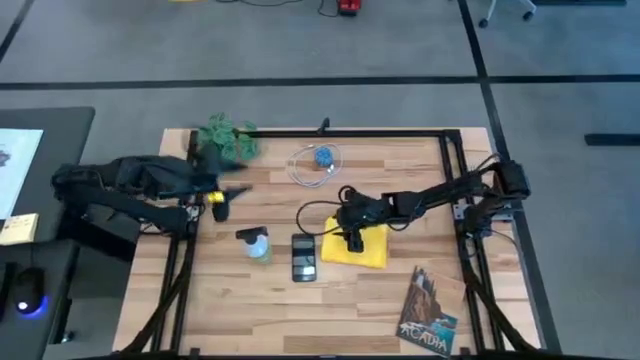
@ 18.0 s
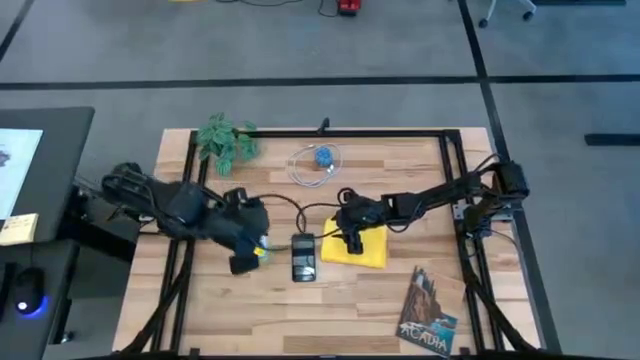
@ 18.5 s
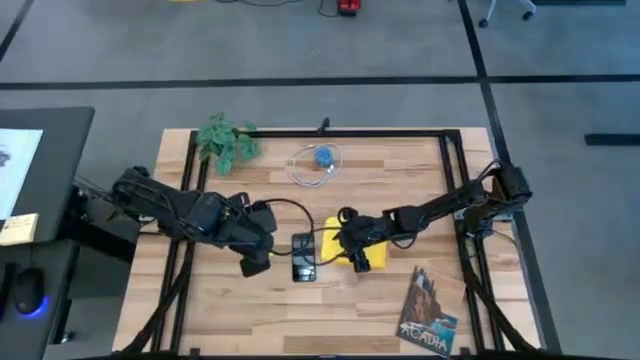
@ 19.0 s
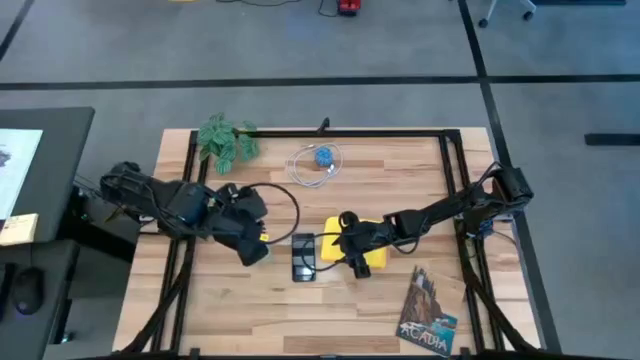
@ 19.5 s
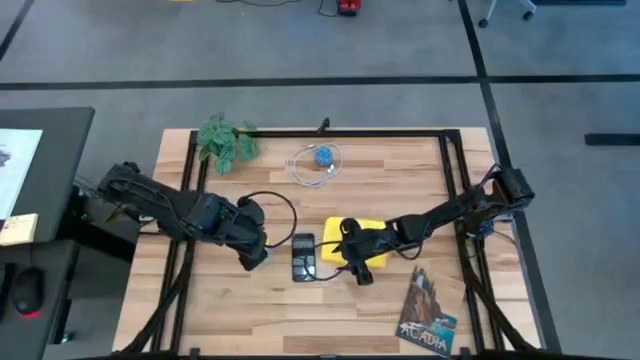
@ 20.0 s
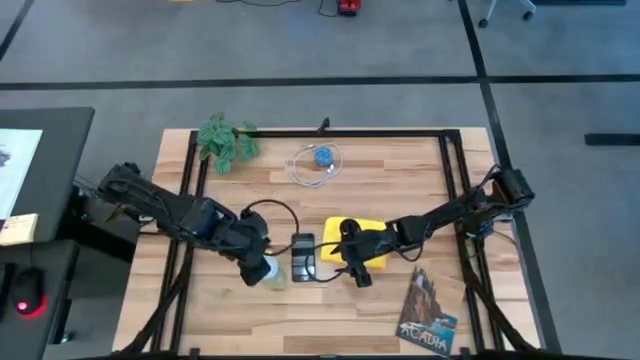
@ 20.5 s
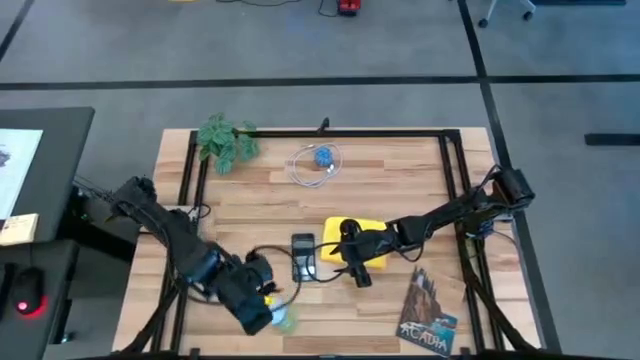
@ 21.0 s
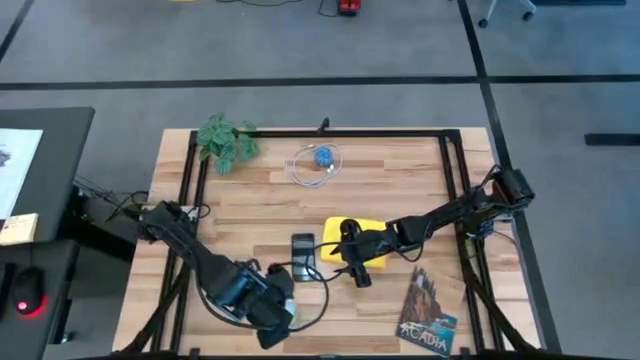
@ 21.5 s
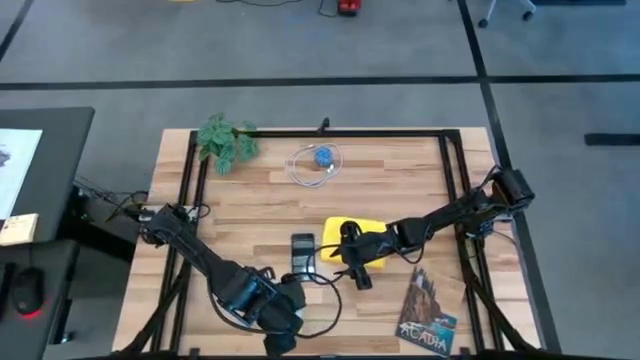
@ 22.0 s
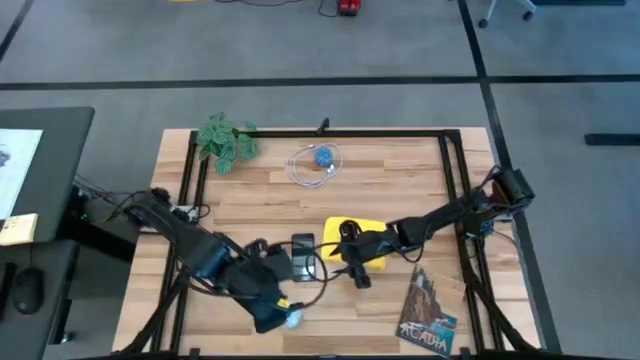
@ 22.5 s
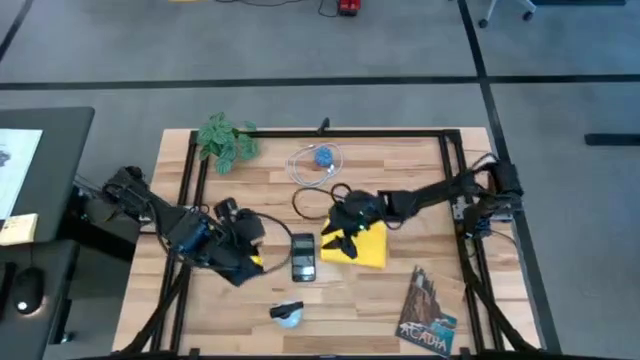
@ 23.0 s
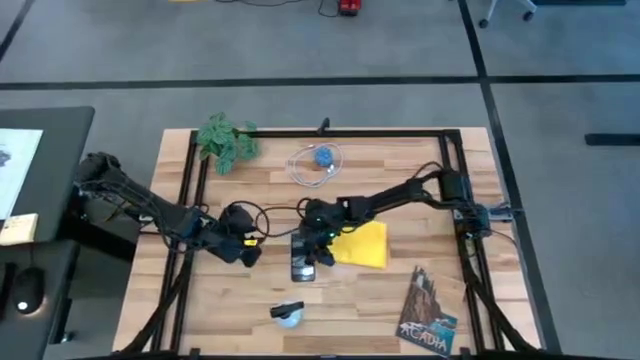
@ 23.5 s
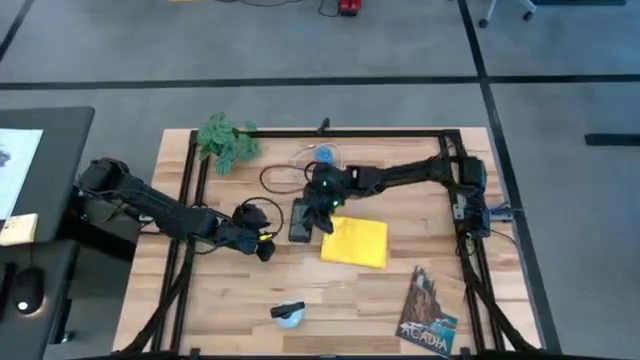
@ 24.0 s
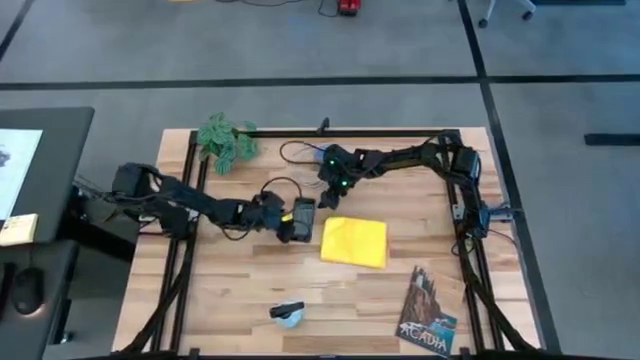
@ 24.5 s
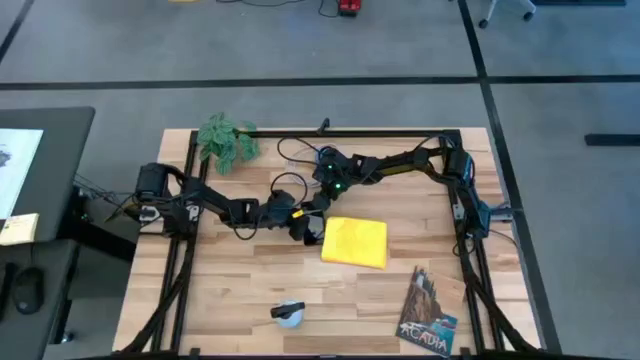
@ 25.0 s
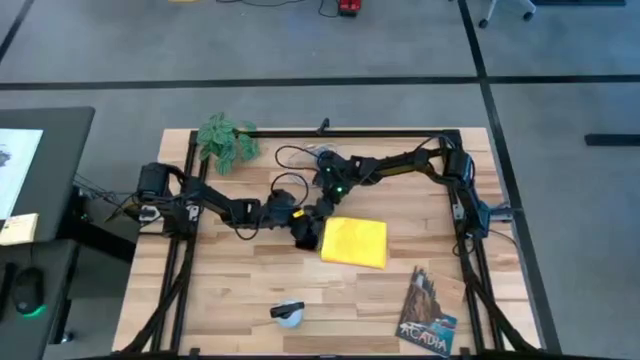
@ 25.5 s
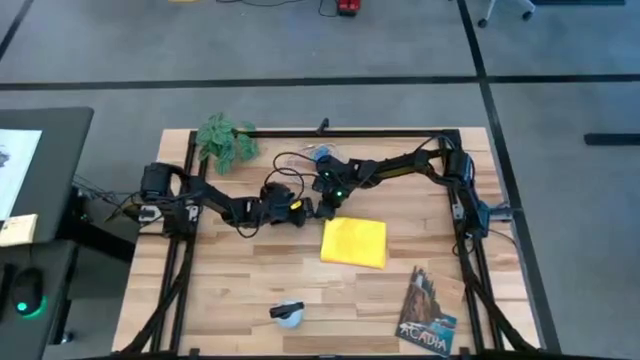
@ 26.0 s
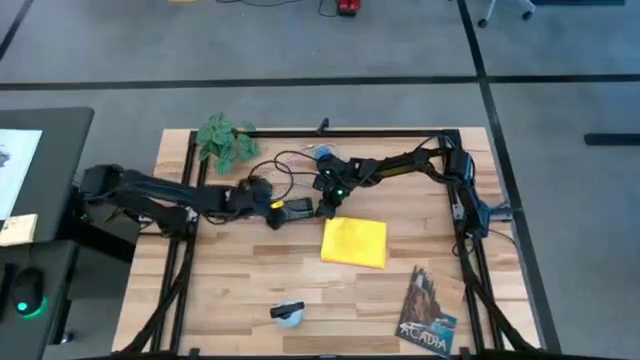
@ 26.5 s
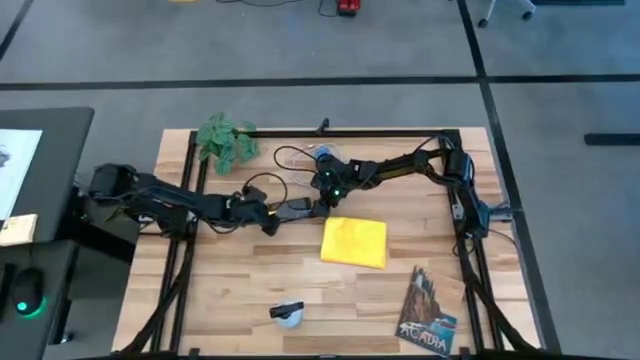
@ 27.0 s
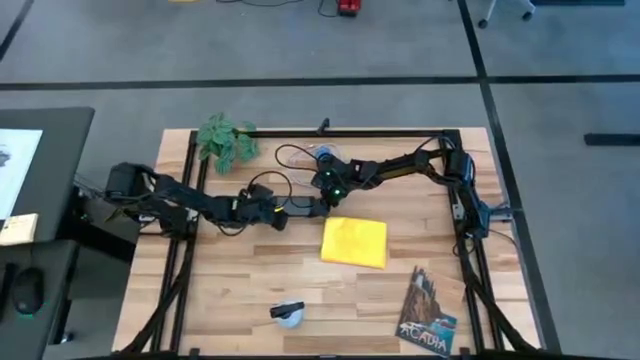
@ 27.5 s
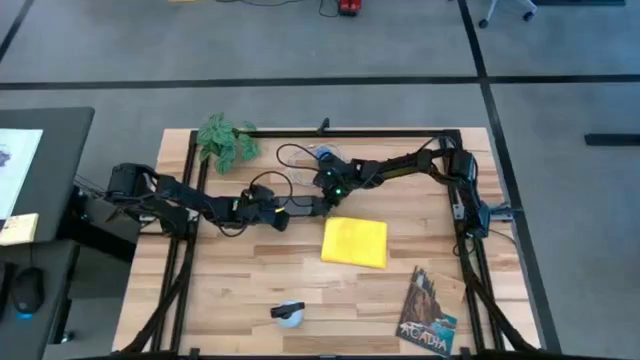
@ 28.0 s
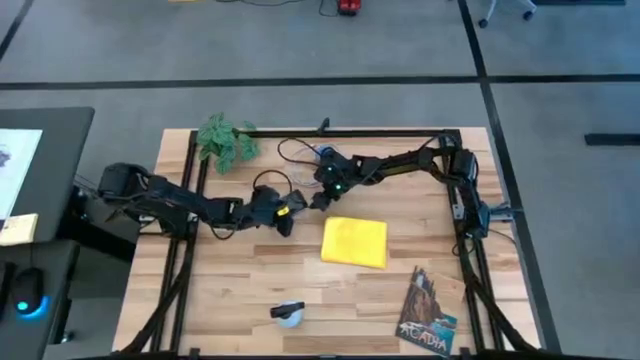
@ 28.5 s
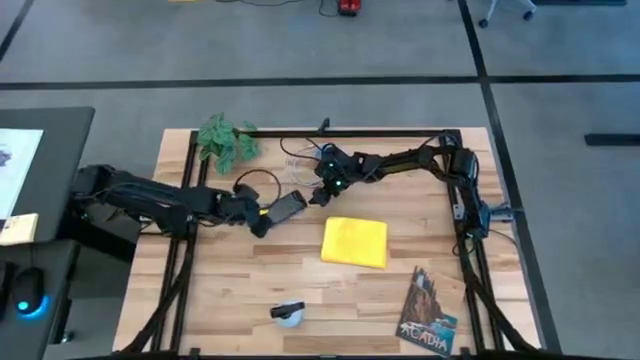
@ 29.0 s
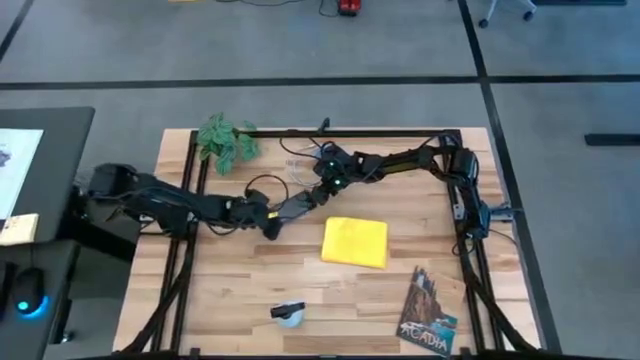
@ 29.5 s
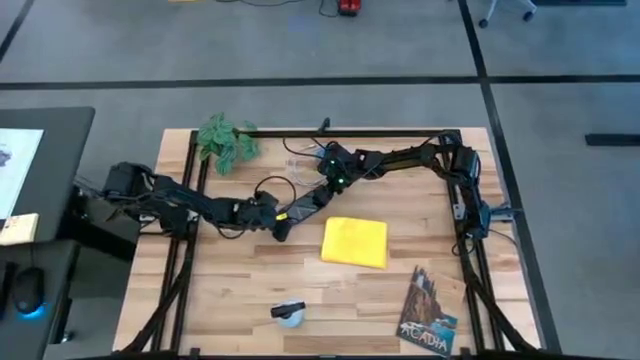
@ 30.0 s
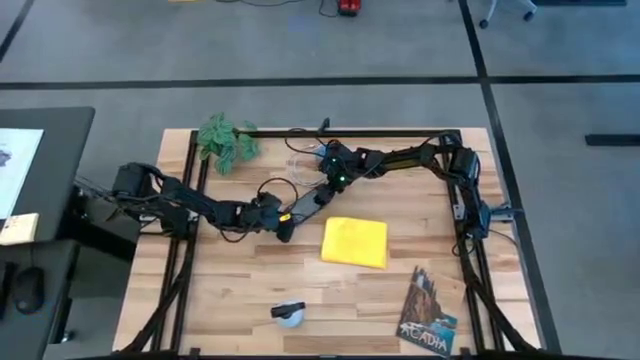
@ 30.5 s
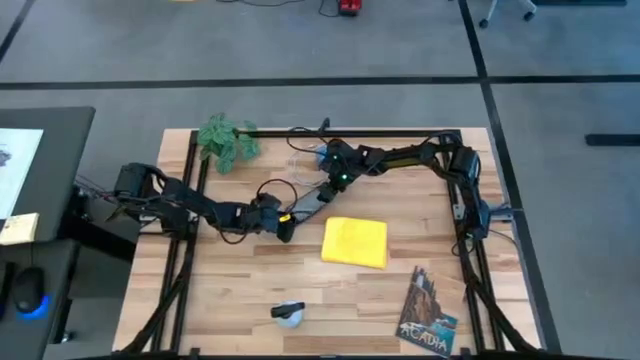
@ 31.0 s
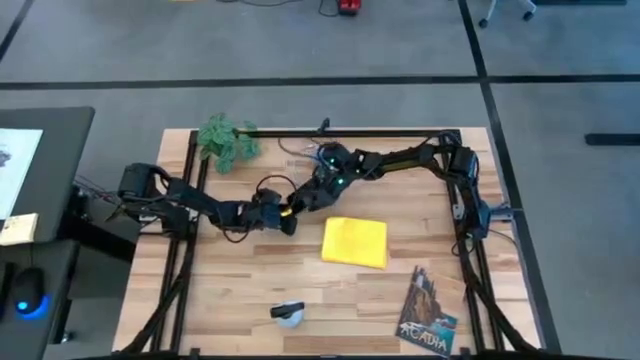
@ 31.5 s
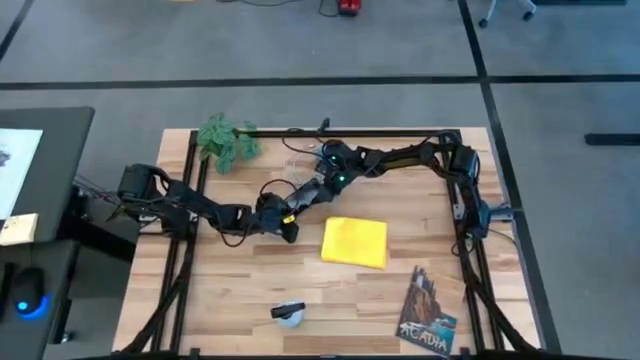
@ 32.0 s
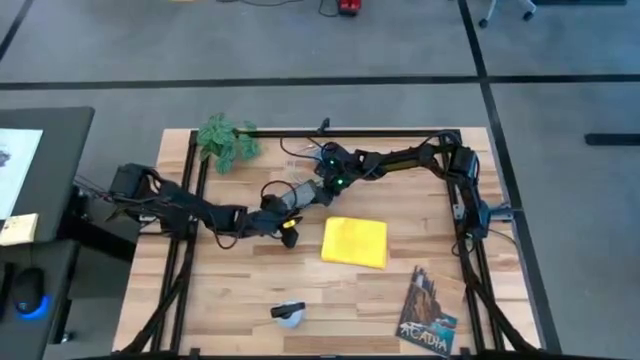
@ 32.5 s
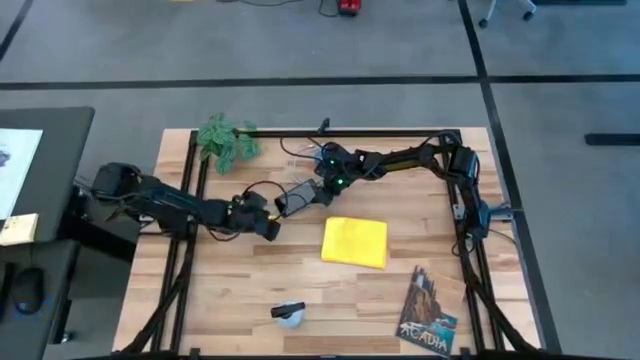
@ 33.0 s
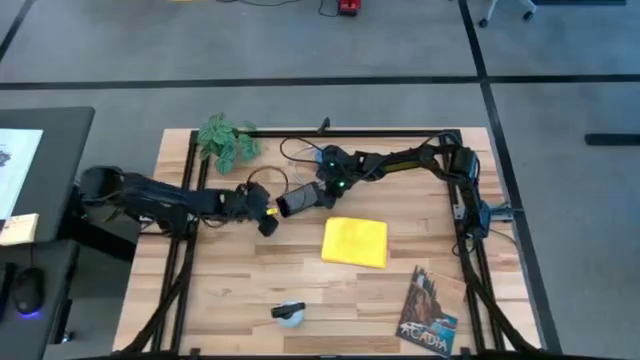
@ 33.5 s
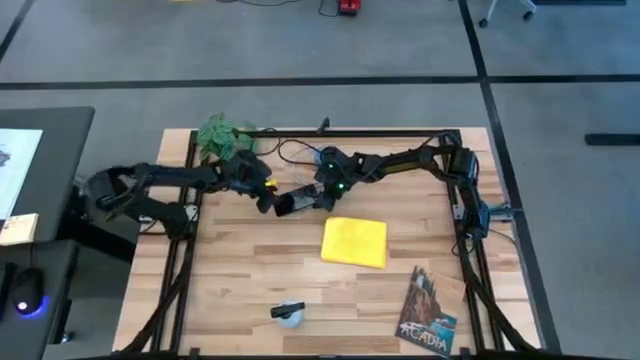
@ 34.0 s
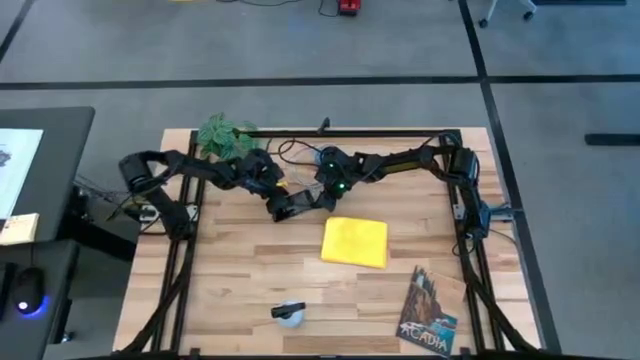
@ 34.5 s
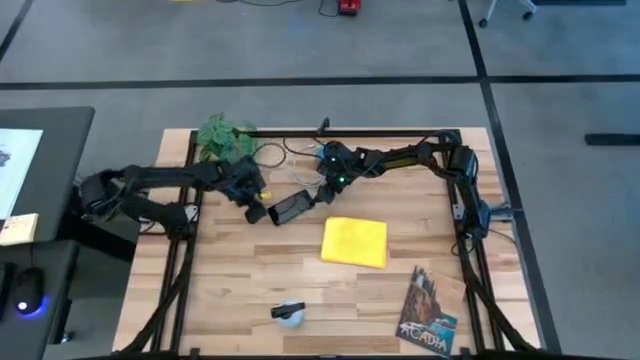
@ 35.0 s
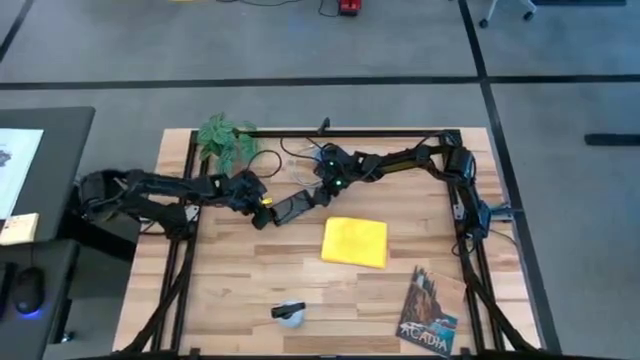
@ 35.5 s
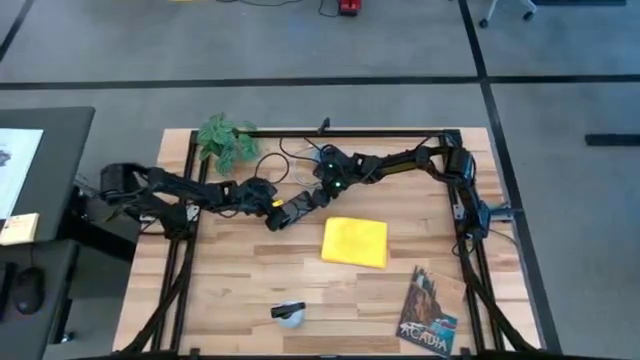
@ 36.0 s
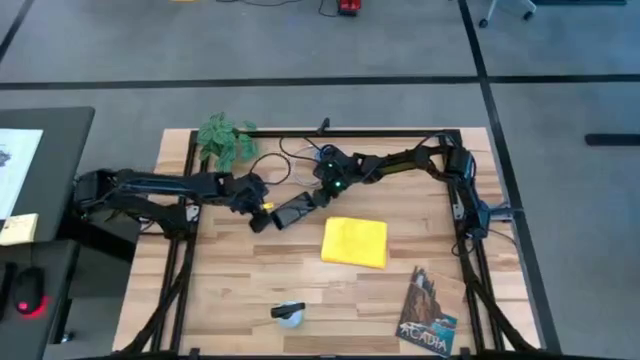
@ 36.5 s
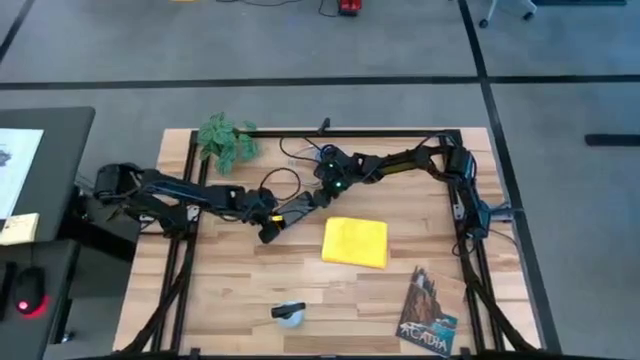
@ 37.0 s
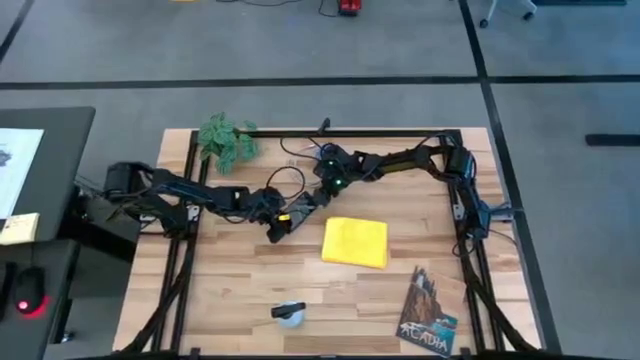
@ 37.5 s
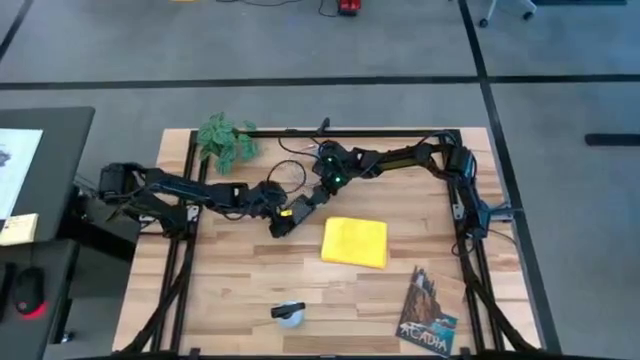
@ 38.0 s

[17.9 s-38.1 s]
Task: Apply microfiber cloth
Spray the front of the cellphone using the cleaning bottle
